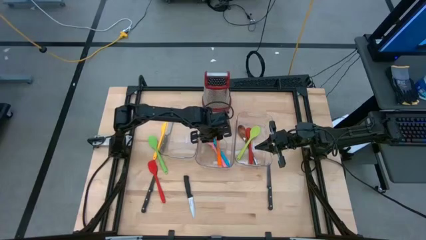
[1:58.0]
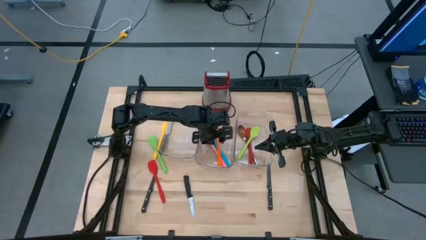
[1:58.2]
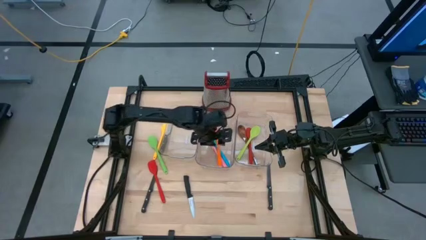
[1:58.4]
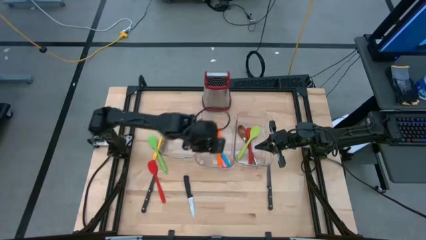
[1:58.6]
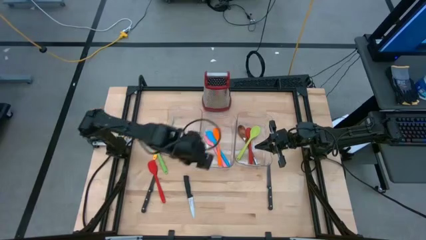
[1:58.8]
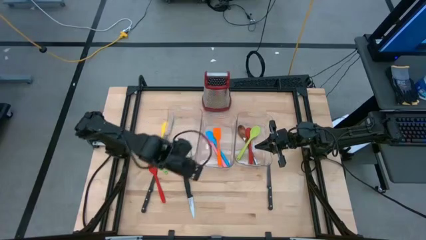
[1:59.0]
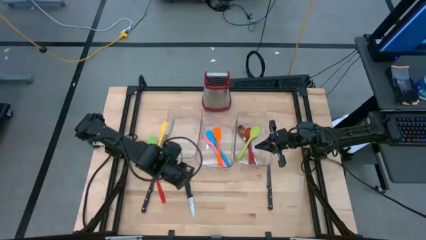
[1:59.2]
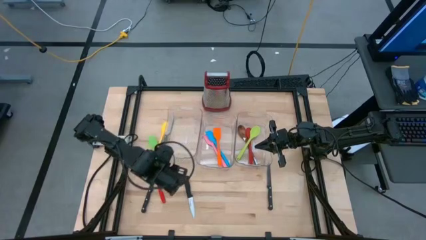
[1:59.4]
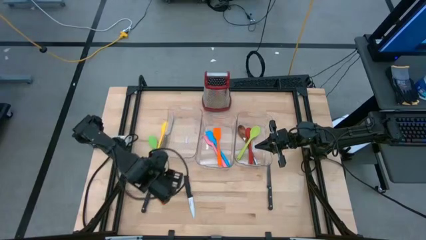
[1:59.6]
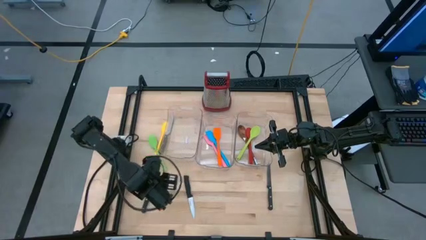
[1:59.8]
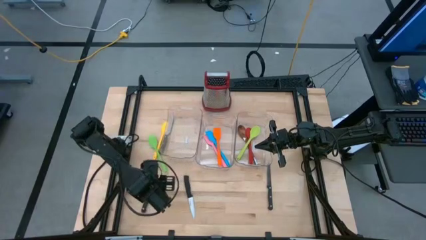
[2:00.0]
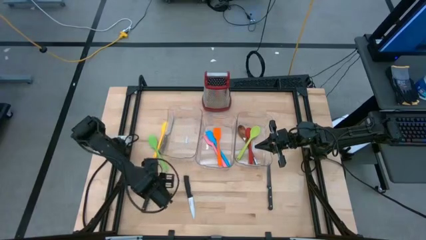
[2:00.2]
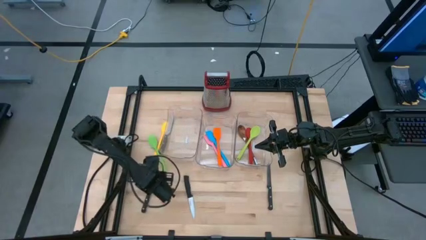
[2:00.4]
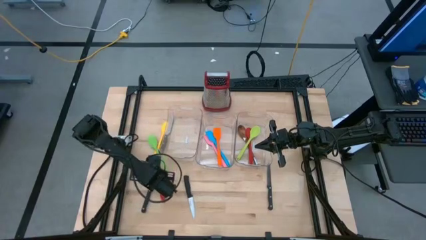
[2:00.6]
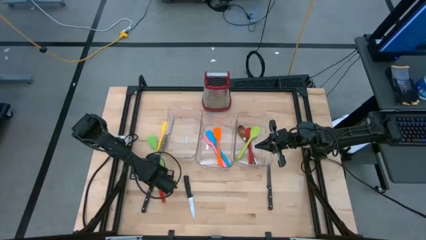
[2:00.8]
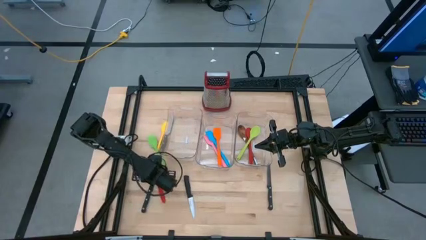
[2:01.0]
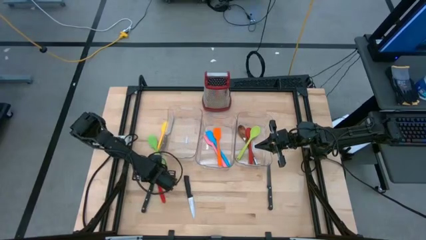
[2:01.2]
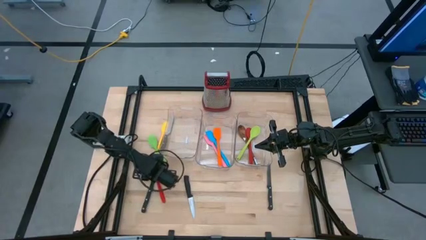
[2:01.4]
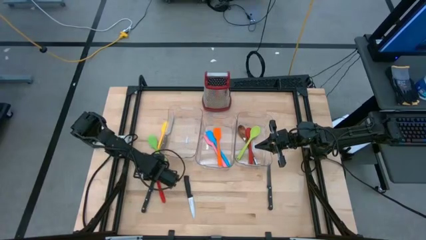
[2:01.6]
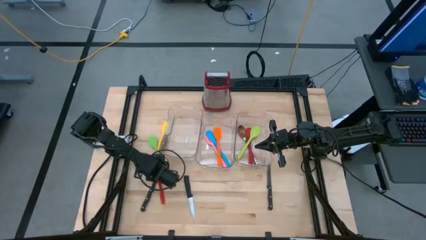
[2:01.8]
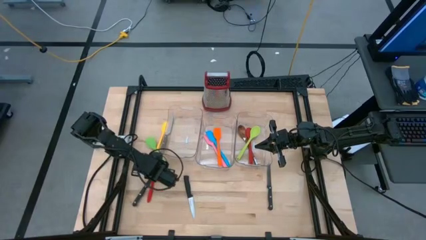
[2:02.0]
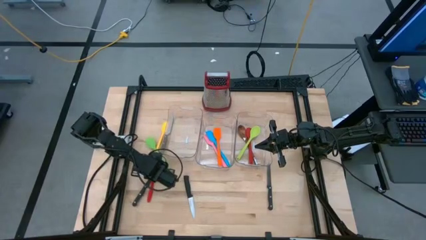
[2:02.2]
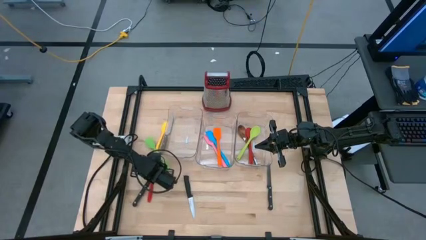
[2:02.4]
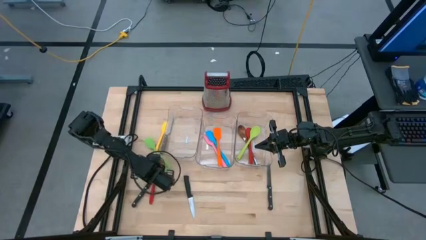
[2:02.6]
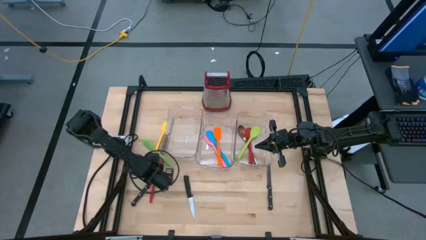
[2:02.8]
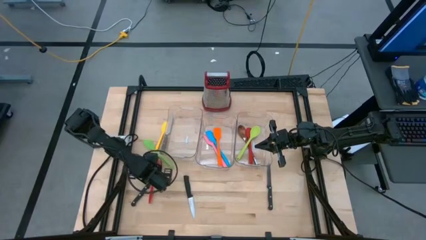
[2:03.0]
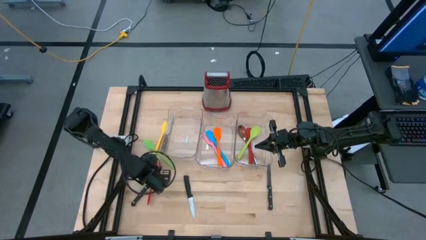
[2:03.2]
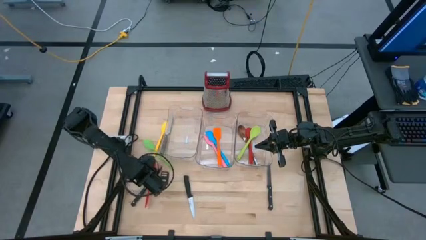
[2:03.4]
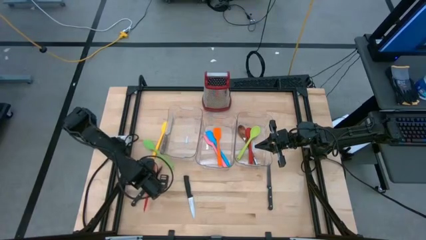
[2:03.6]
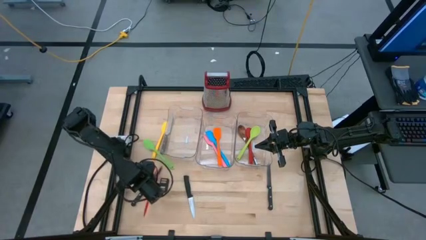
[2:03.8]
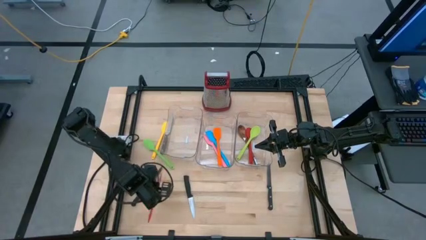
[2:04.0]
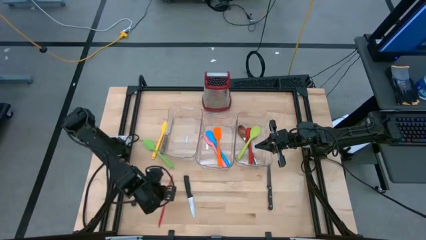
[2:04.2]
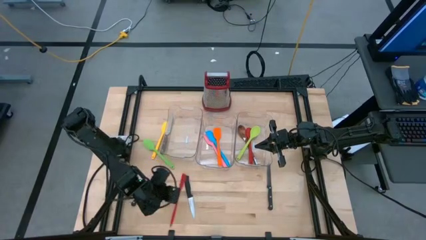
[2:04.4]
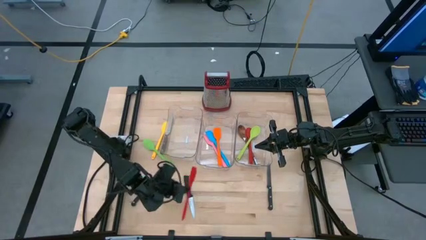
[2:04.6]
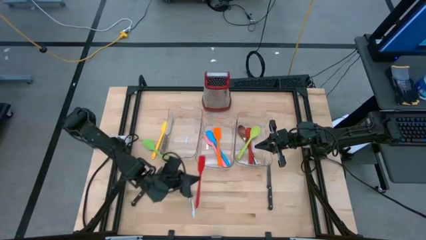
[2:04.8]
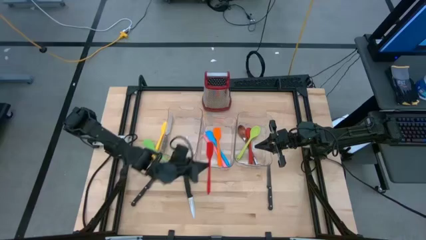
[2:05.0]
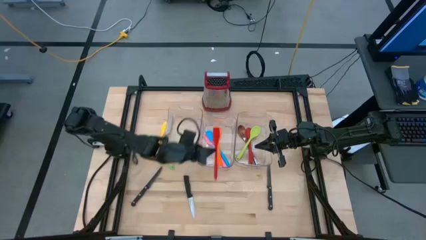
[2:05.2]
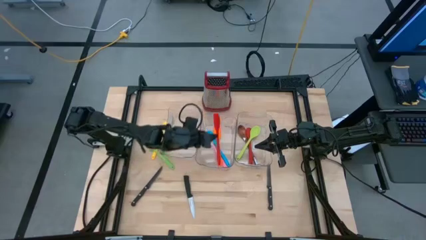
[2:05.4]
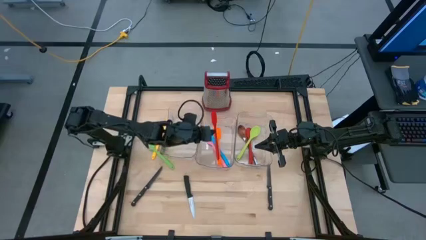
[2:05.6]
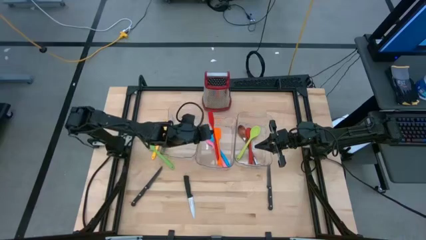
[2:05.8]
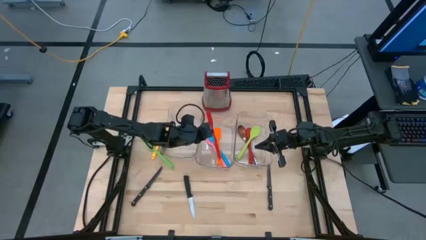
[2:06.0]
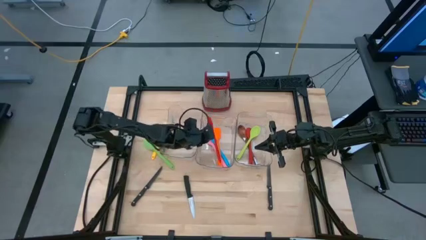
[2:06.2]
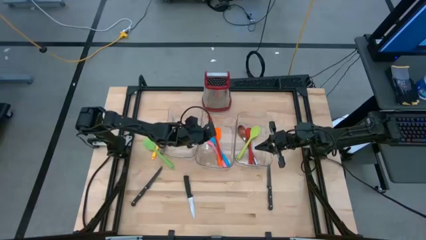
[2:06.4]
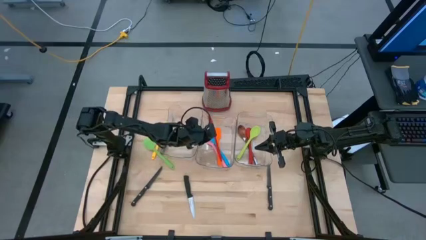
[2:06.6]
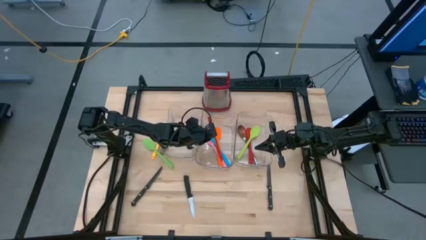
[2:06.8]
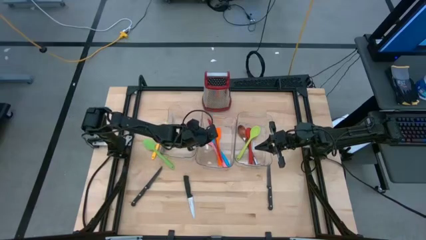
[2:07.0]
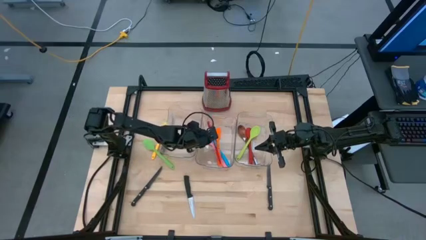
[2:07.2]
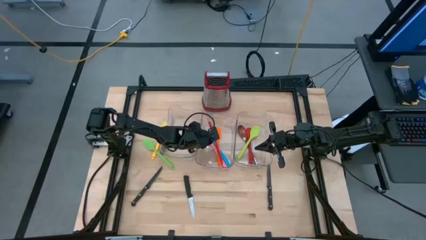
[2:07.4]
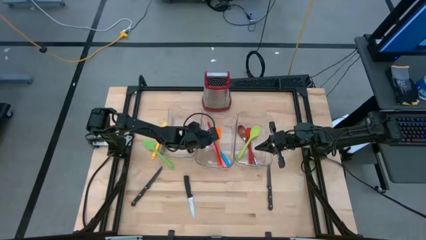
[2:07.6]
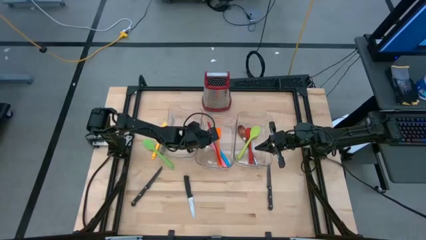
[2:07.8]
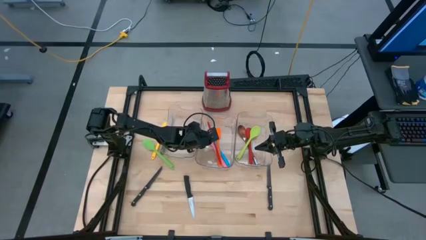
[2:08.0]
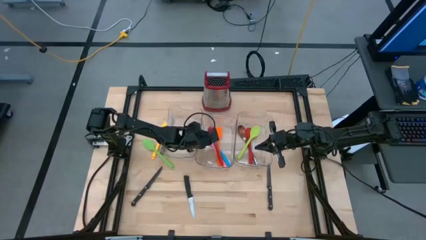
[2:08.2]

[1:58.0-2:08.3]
Task: Pick & Place Kitchen Items
Put the red spatula into the middle transparent bin

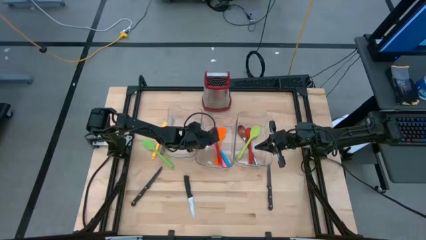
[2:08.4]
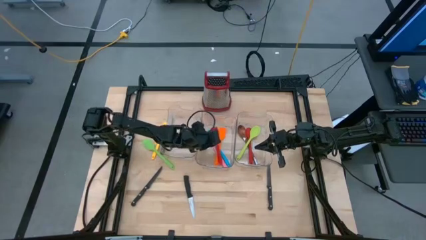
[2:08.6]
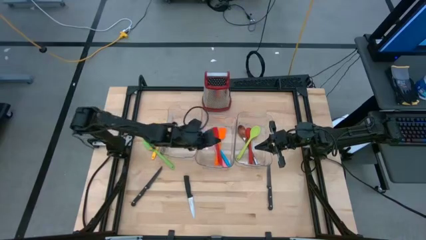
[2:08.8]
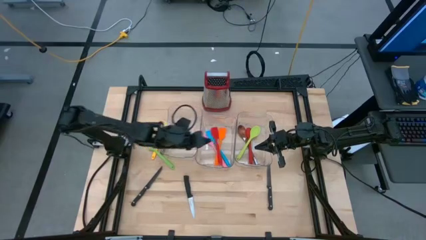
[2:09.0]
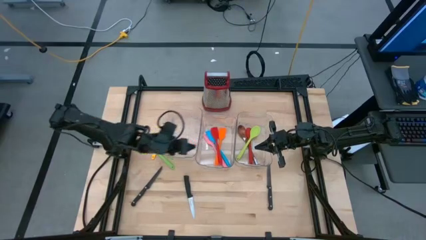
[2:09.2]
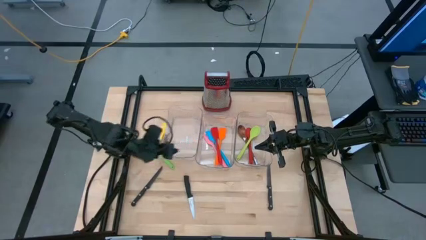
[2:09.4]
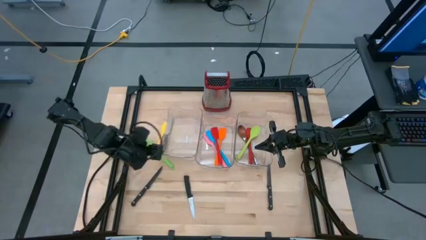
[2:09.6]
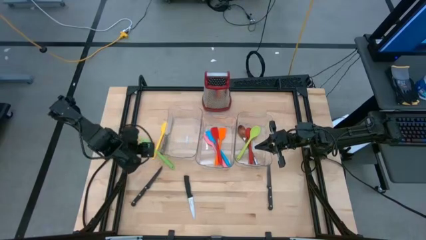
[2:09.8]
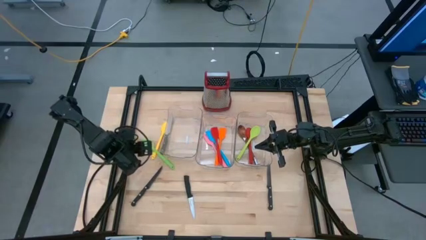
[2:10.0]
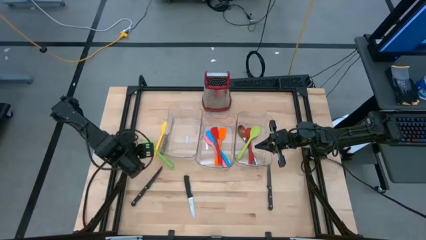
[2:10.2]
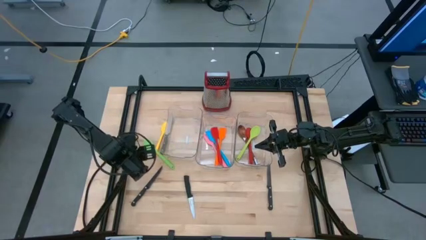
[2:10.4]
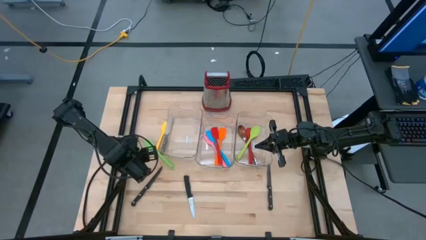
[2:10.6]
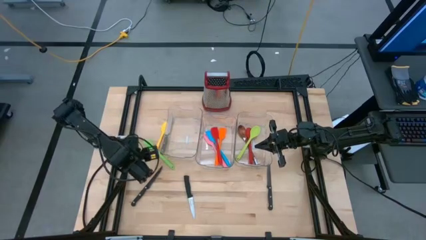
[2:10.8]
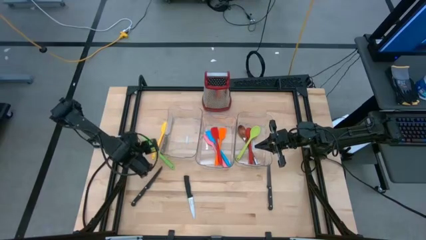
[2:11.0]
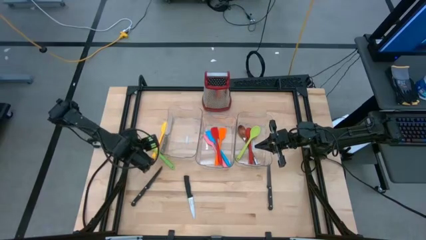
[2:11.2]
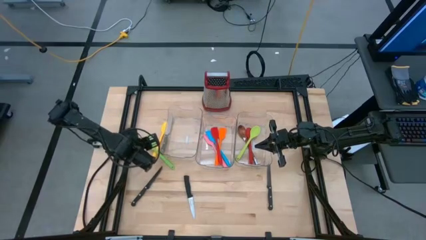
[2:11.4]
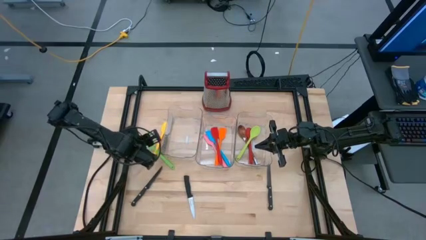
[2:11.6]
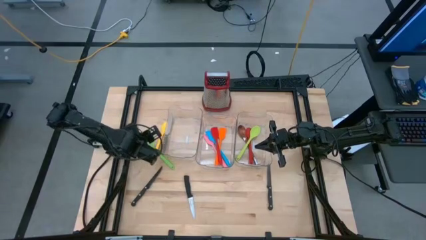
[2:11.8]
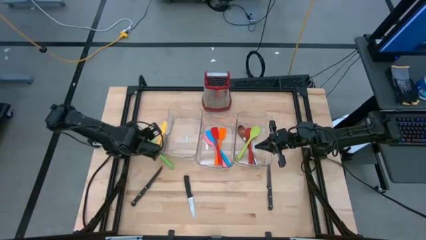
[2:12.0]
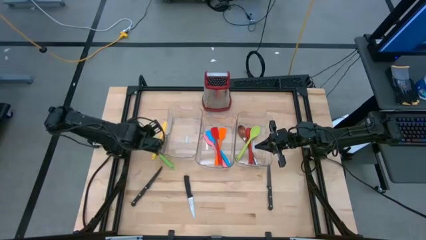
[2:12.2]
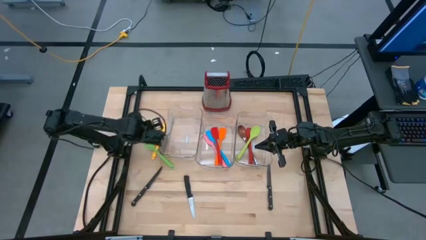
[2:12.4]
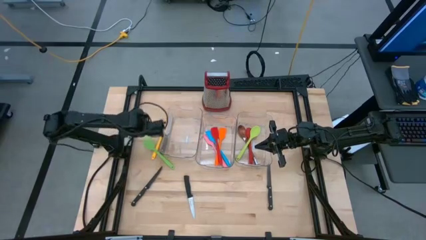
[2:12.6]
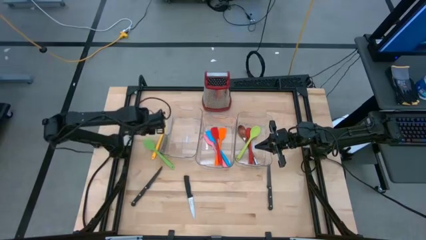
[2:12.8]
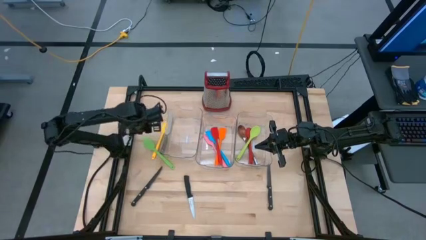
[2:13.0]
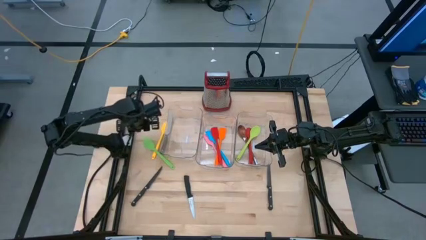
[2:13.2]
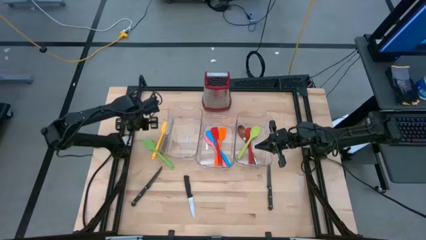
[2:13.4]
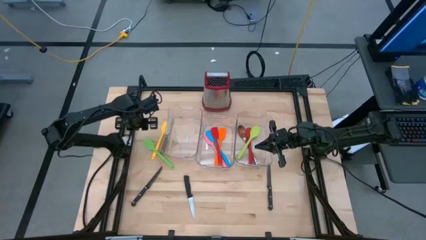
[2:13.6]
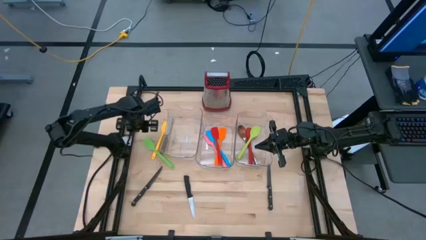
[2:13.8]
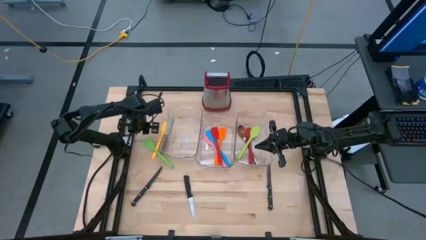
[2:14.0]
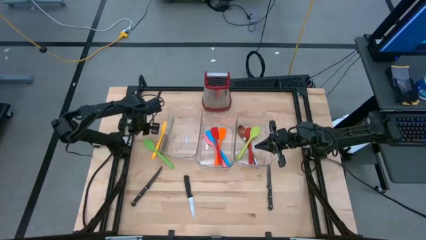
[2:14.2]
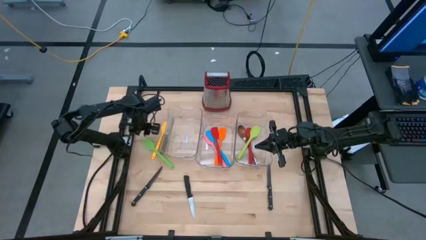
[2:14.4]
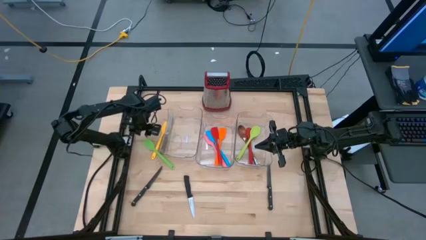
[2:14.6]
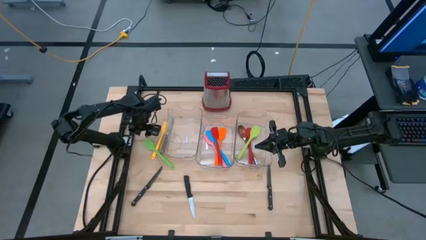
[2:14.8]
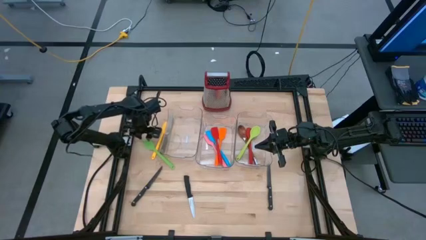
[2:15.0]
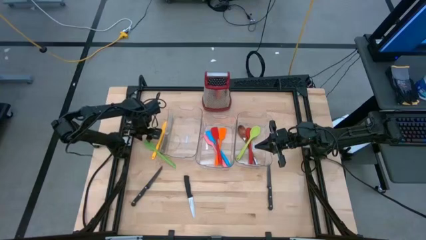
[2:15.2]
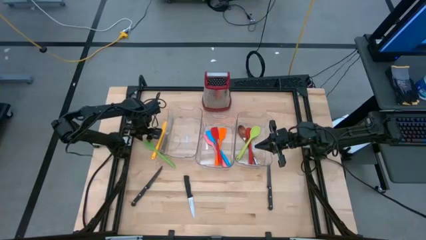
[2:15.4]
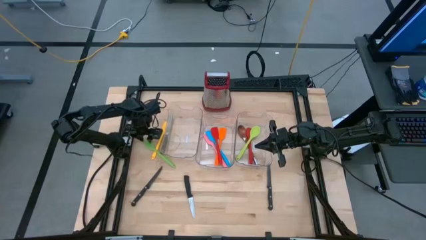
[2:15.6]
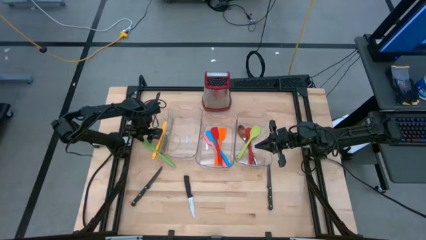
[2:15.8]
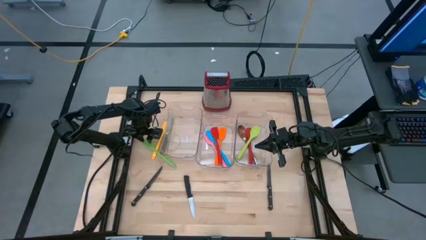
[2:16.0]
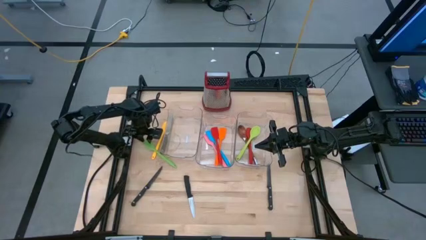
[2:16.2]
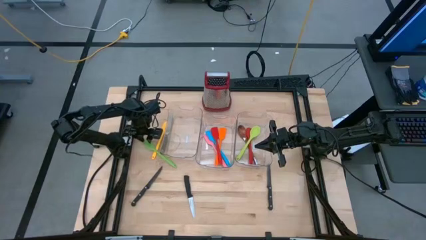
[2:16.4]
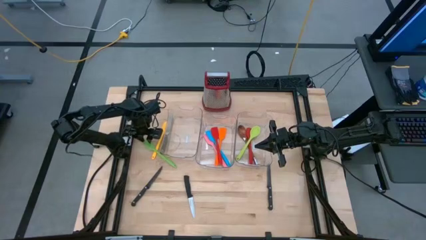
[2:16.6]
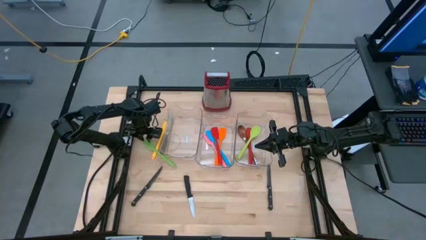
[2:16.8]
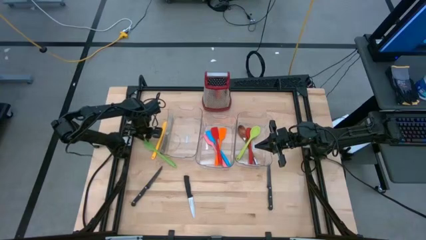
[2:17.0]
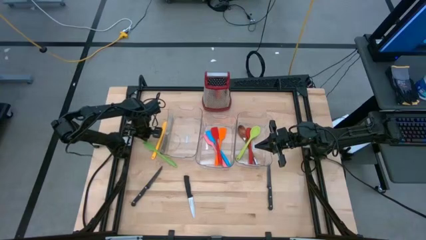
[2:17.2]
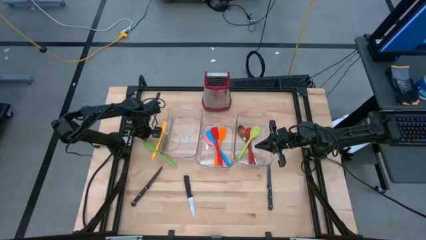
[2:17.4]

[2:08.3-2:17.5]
Put the green spatula into the middle transparent bin
